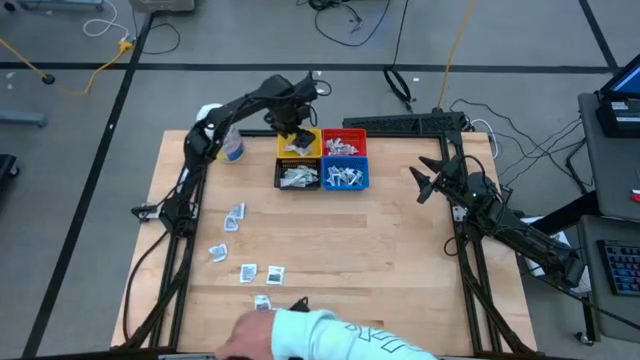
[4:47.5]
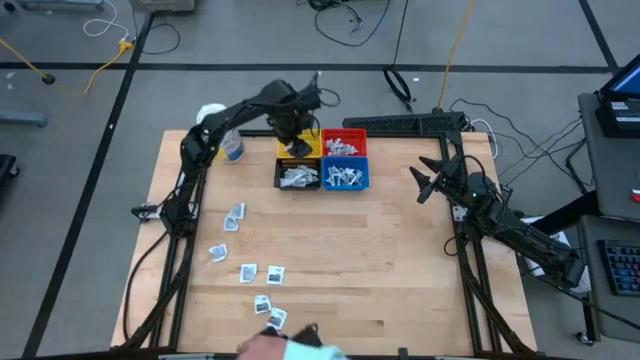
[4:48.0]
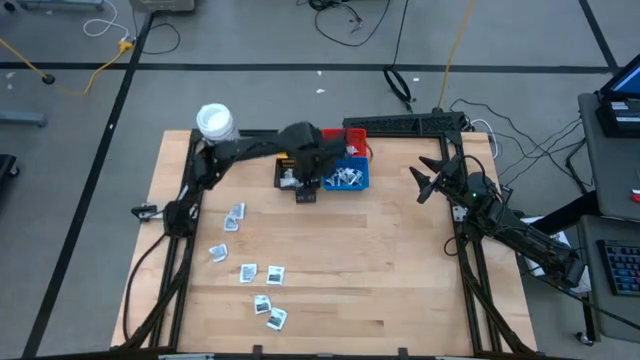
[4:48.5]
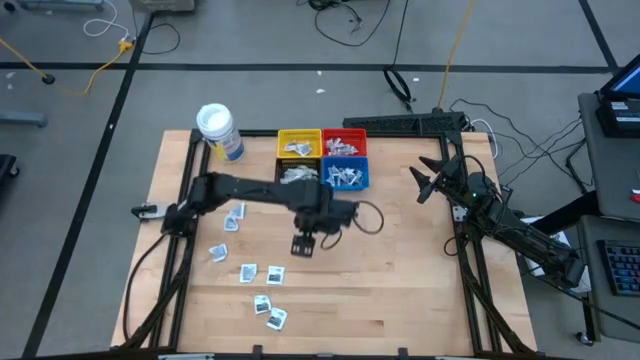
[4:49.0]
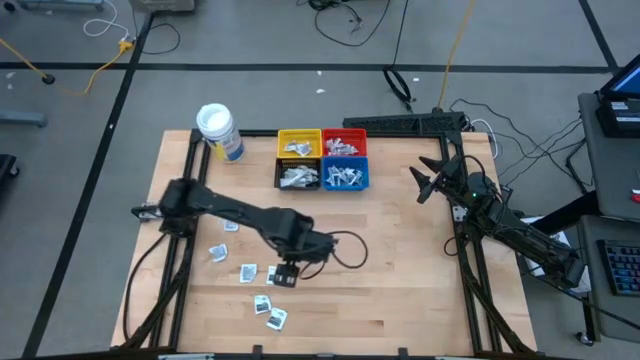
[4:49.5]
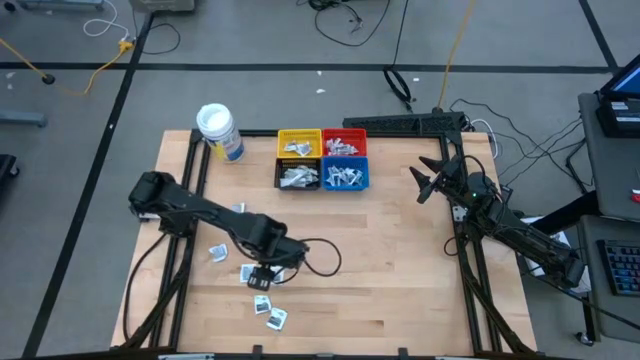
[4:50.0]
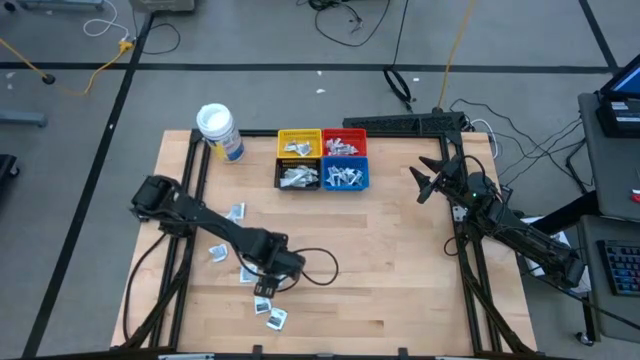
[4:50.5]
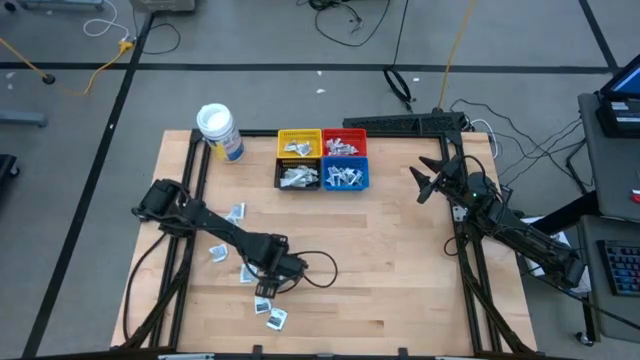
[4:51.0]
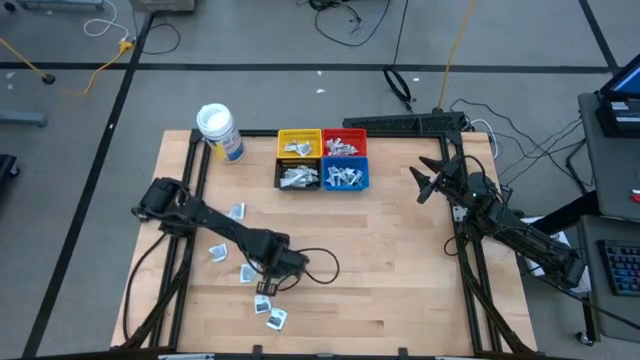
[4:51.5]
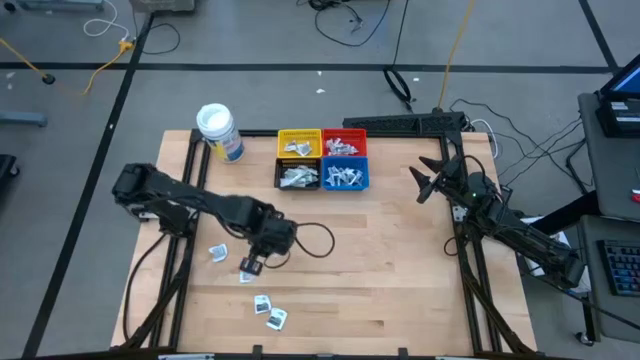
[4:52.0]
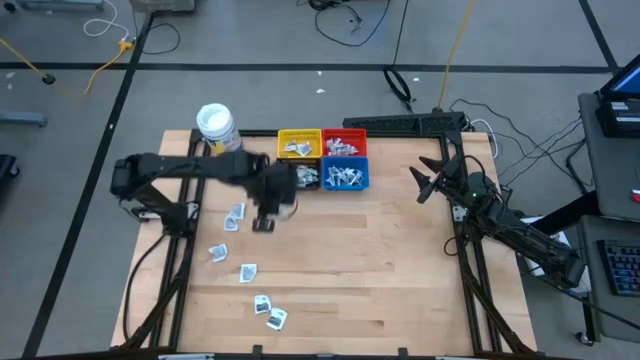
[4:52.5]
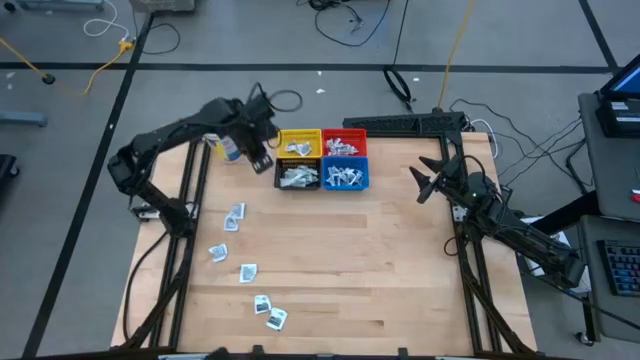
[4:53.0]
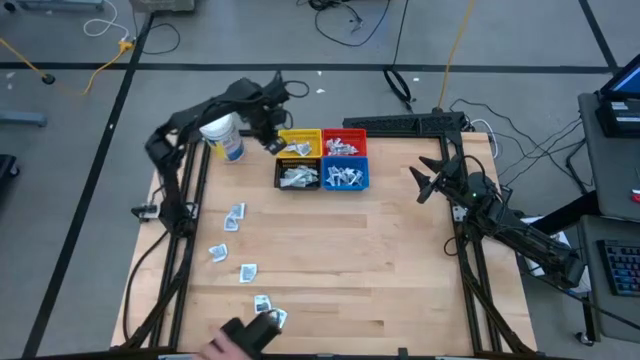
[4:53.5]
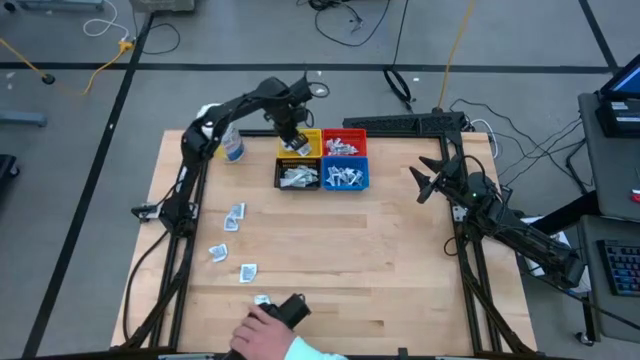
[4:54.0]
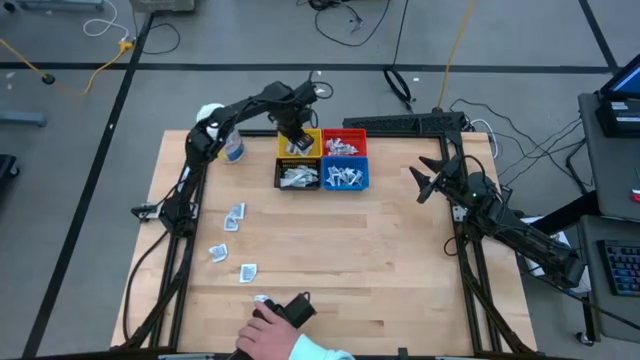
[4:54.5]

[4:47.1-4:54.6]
Task: Pick & Place First Aid Supplies
Put the gray towelette pack into the yellow basket

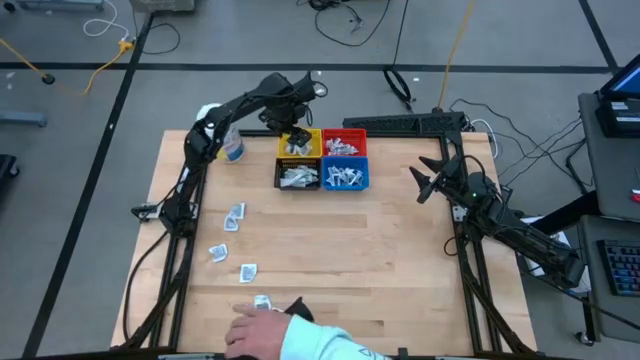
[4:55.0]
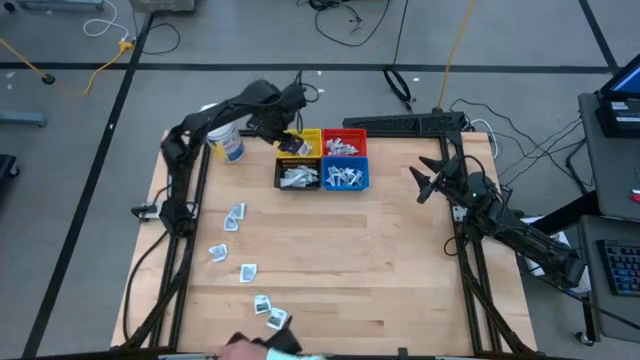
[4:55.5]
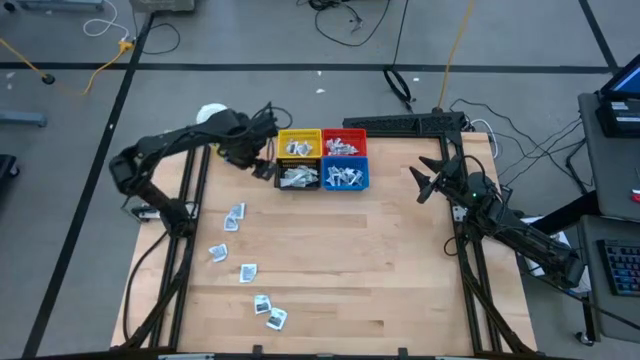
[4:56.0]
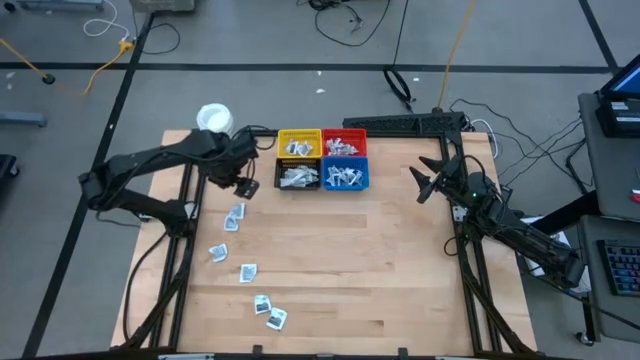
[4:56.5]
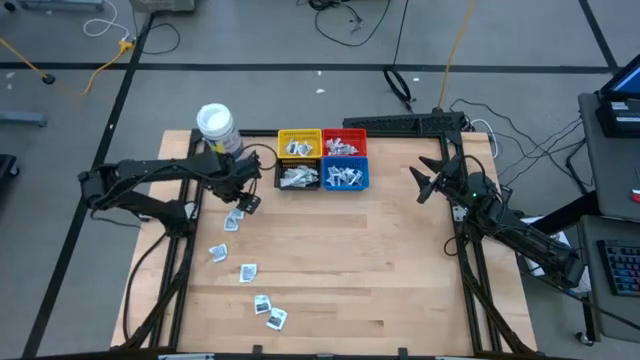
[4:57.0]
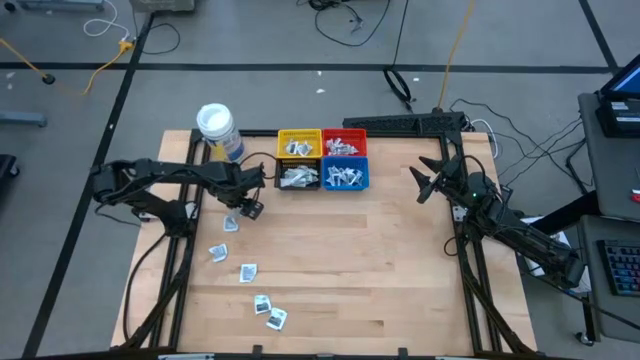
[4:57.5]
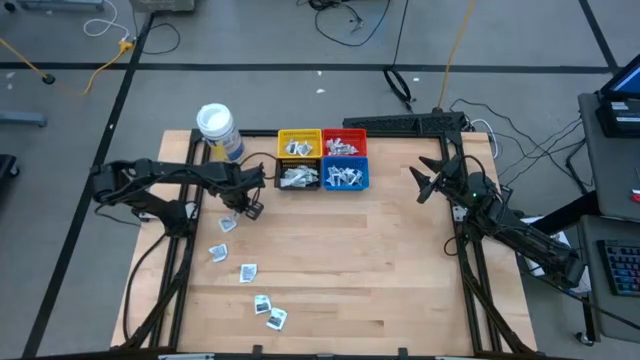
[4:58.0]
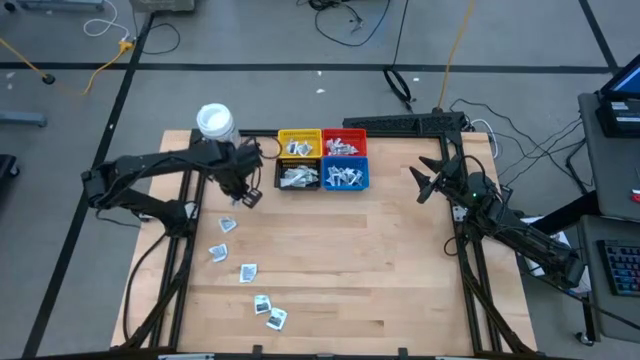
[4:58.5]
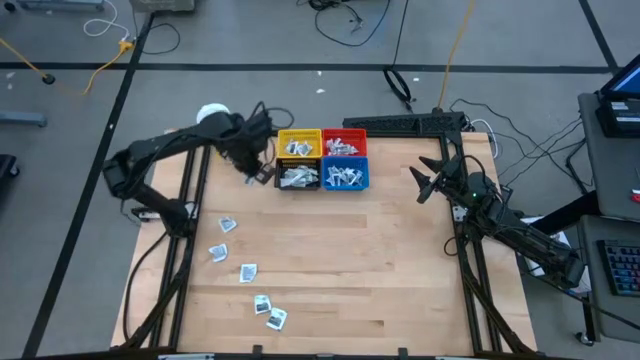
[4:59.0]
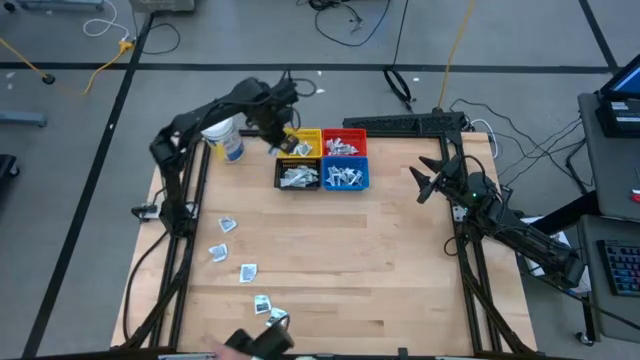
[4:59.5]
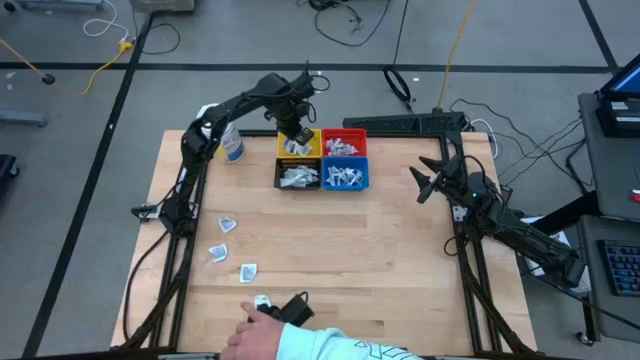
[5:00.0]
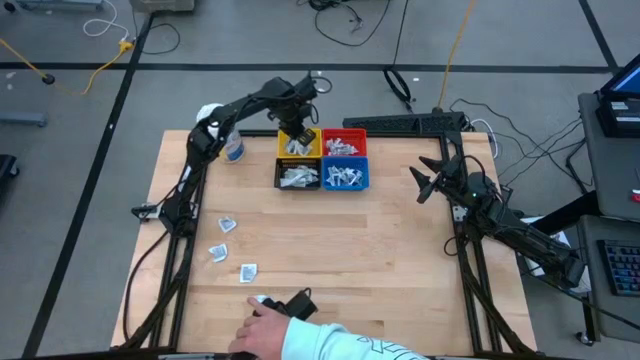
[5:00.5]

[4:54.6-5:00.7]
Put the gray towelette pack into the yellow basket

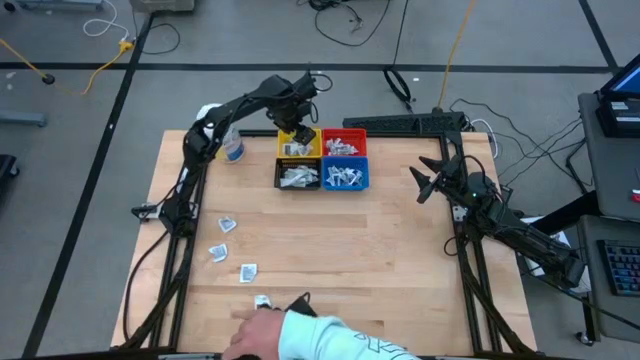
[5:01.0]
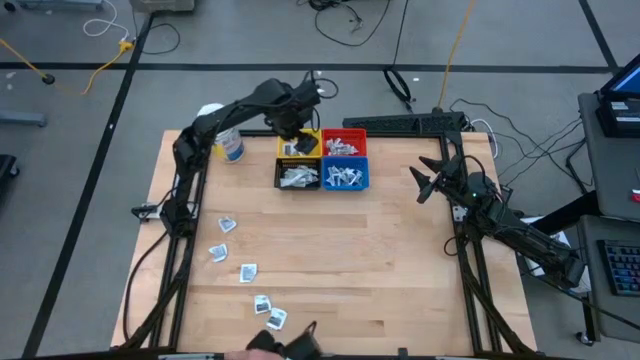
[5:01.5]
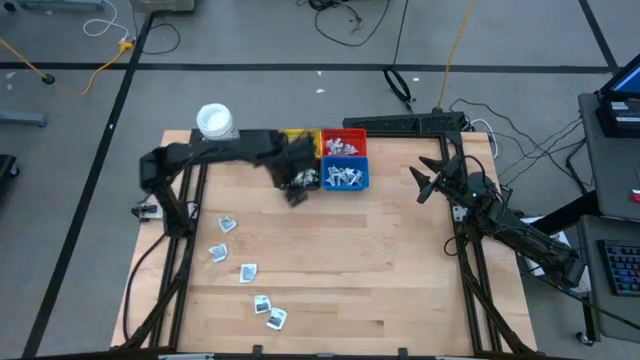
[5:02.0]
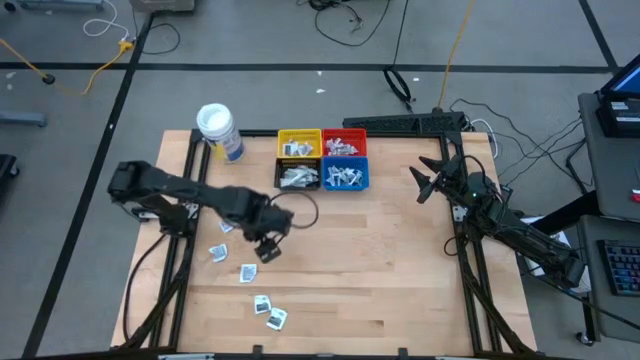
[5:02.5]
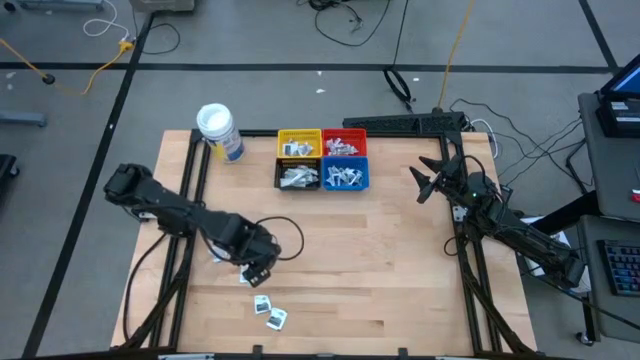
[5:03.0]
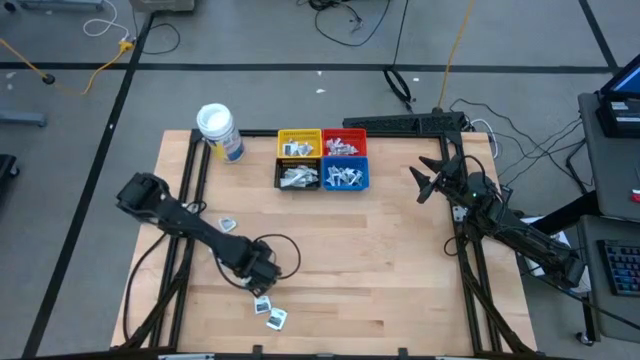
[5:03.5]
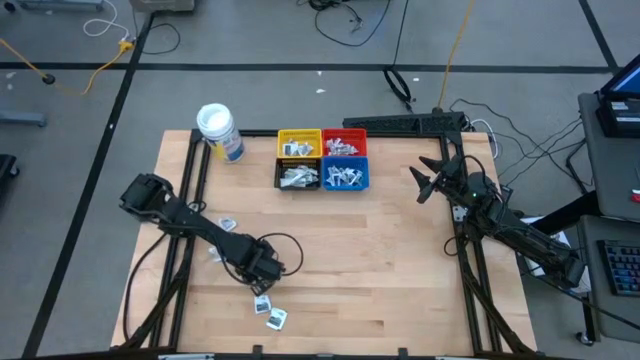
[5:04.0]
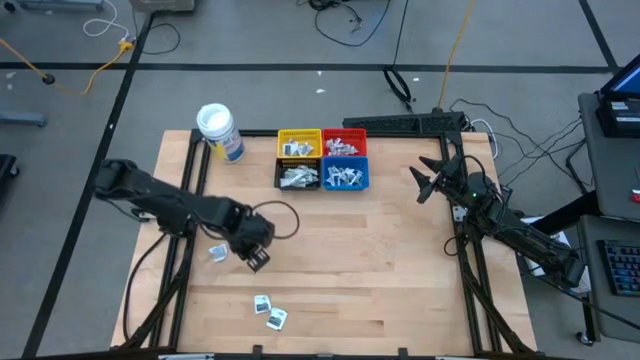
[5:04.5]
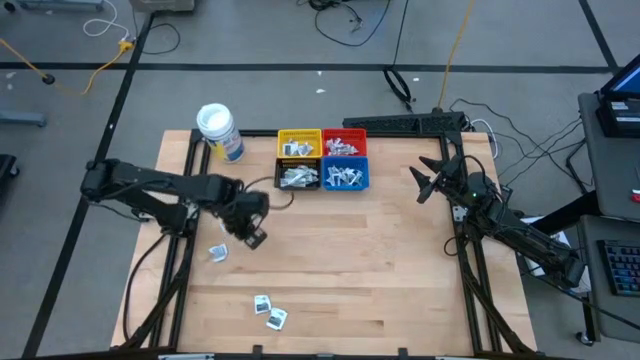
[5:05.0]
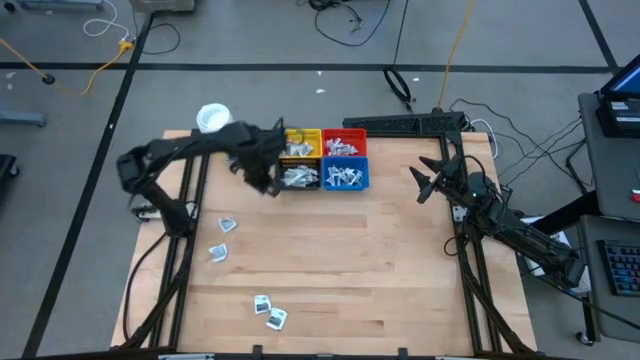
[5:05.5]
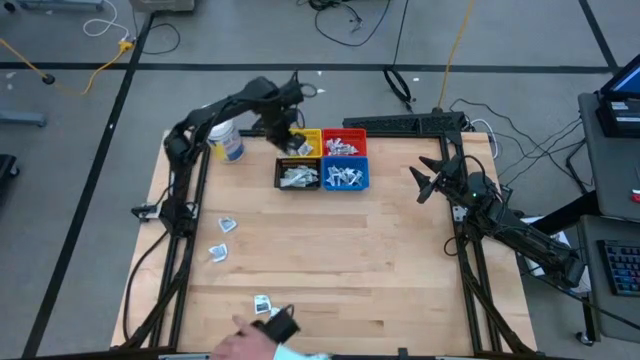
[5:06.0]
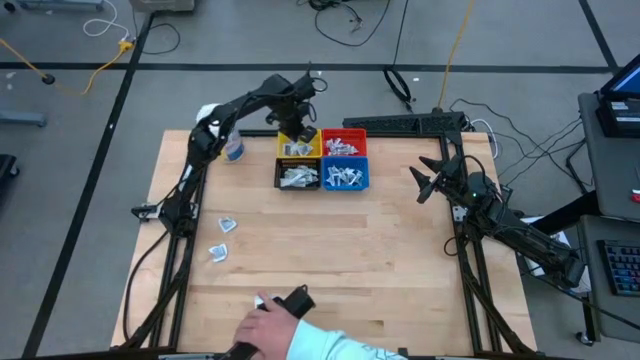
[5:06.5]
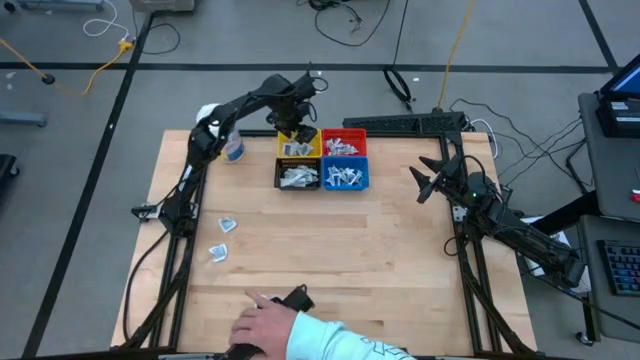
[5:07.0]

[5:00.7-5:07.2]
Put the gray towelette pack into the yellow basket

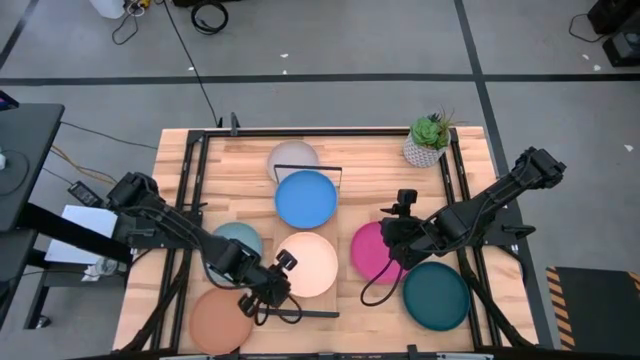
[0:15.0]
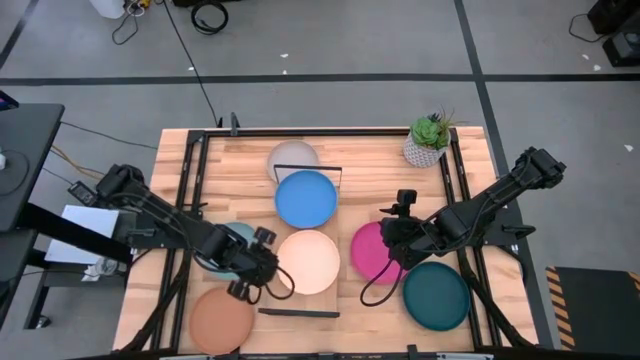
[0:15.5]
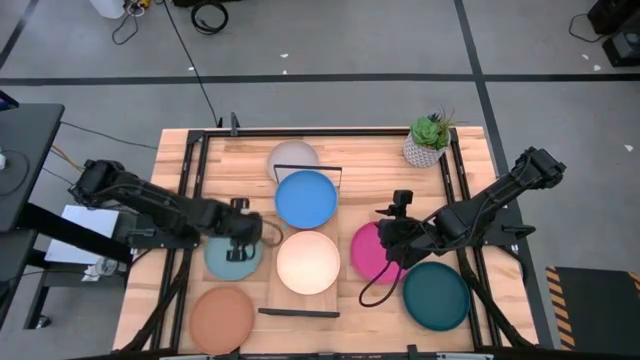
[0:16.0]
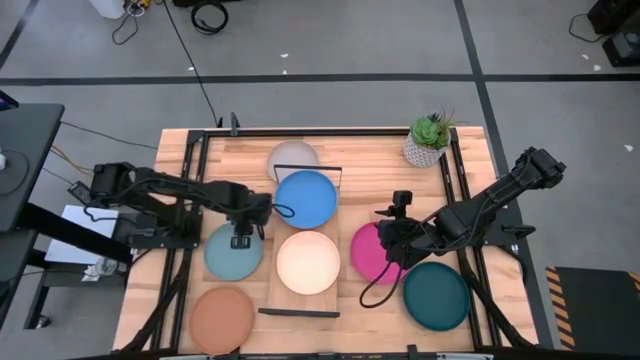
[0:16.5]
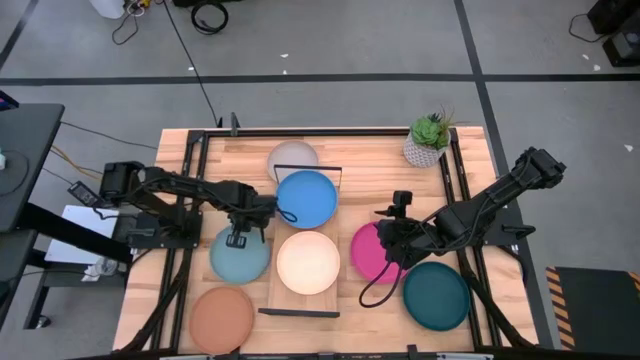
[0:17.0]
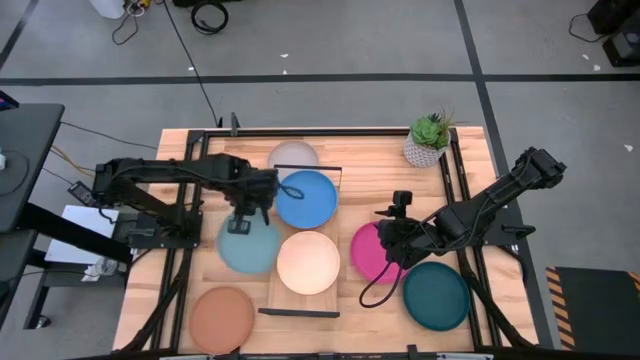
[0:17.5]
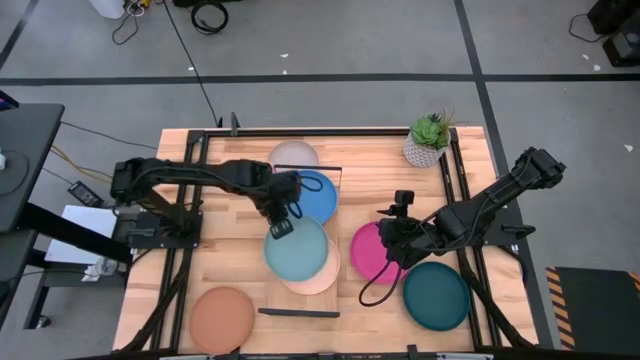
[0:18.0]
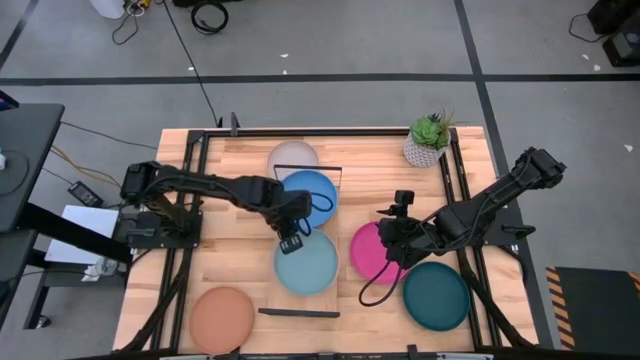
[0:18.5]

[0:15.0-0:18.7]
Task: Place and stack plates onto a shelf
Stack the light blue plate on top of the light orange plate on the shelf
